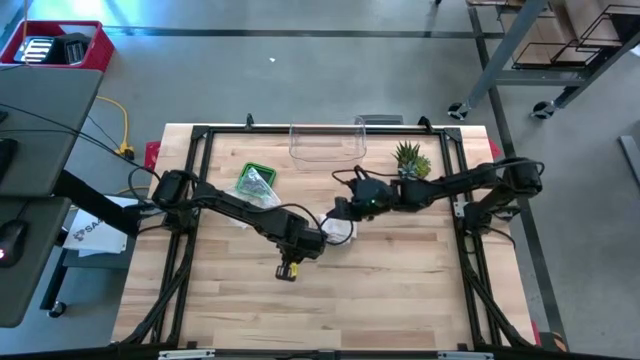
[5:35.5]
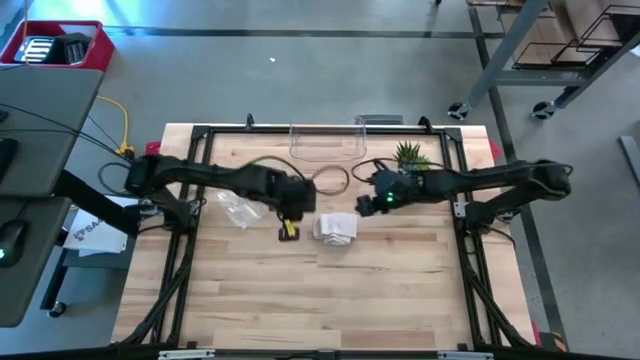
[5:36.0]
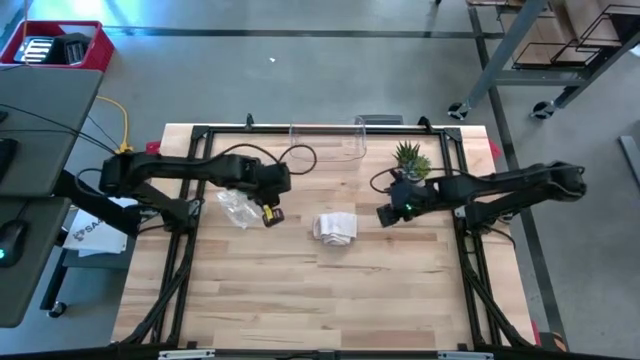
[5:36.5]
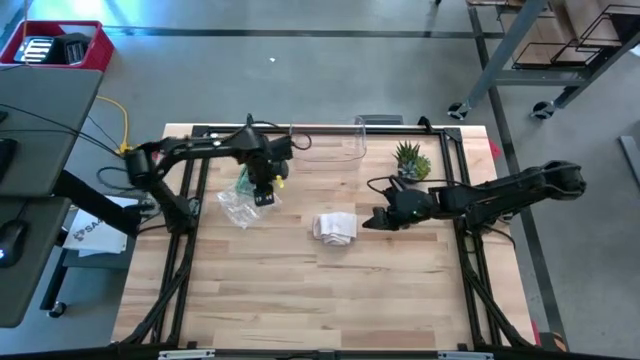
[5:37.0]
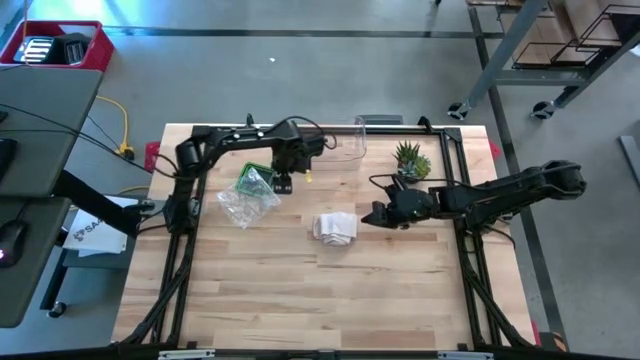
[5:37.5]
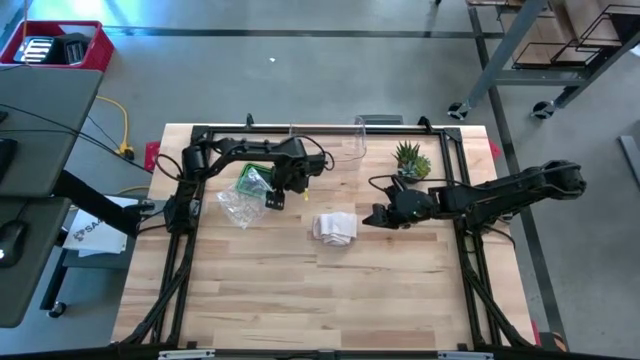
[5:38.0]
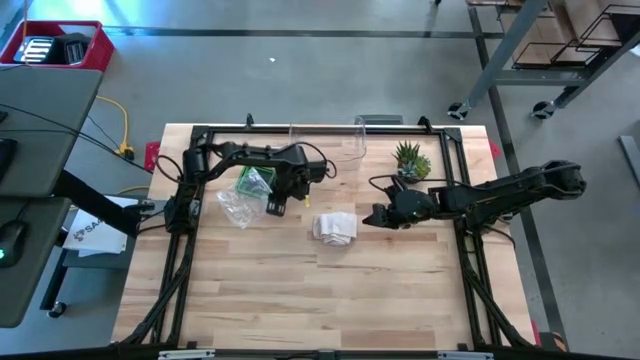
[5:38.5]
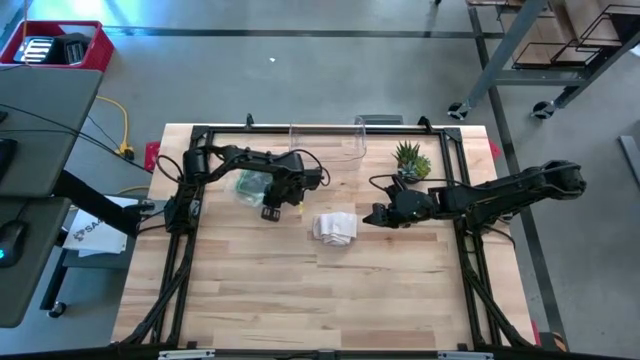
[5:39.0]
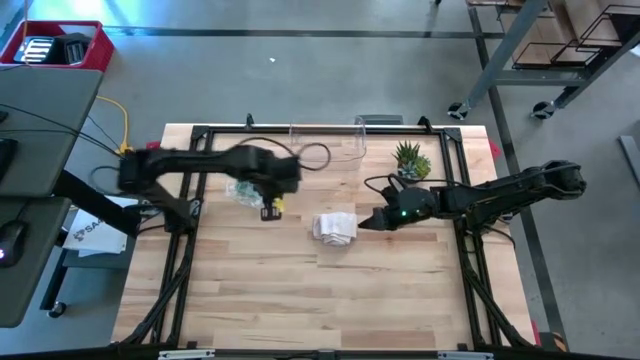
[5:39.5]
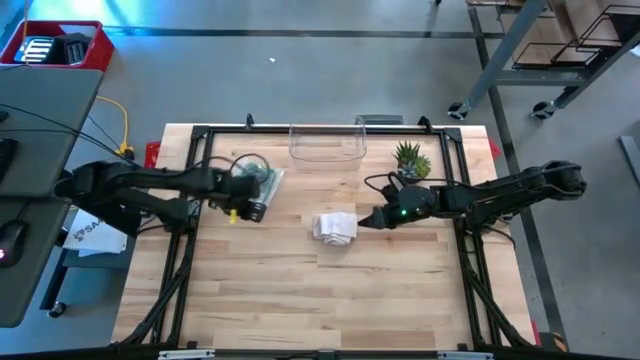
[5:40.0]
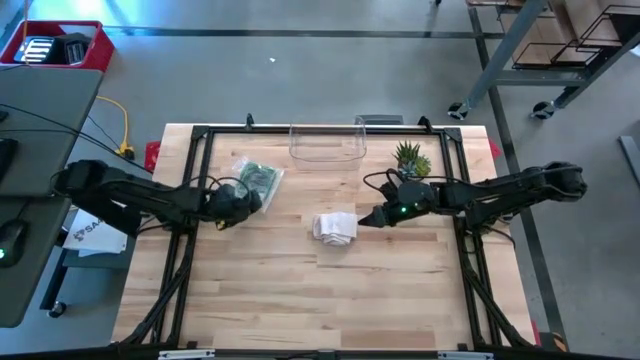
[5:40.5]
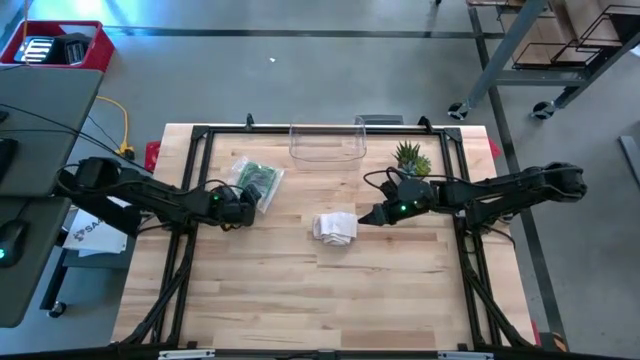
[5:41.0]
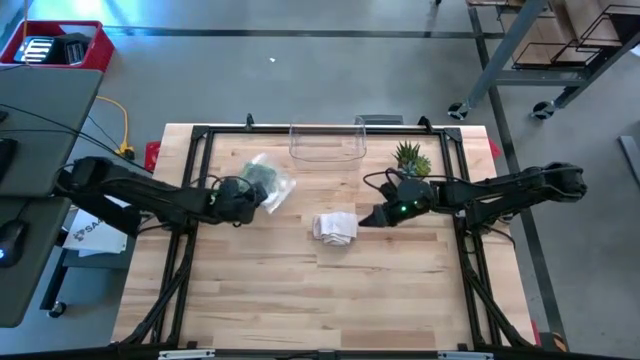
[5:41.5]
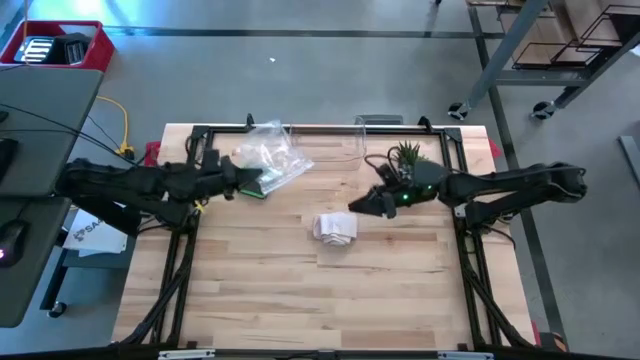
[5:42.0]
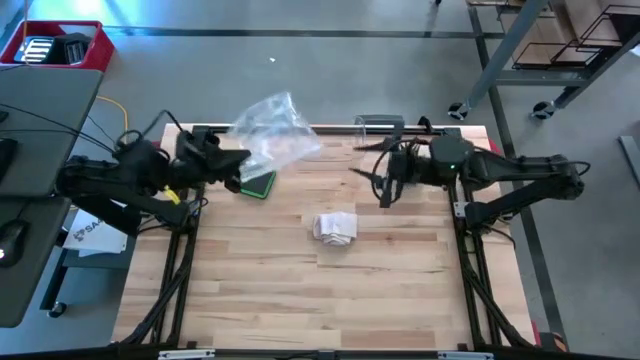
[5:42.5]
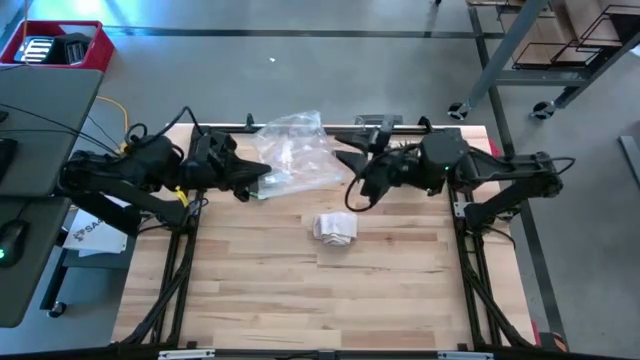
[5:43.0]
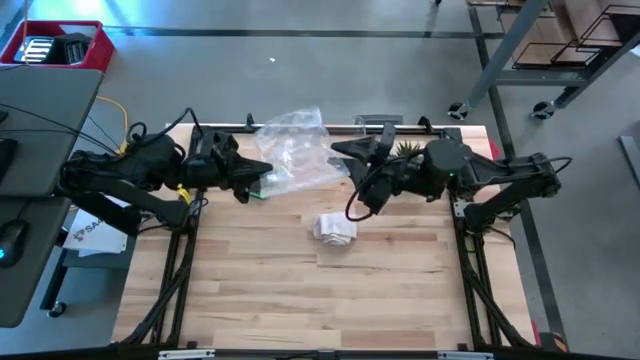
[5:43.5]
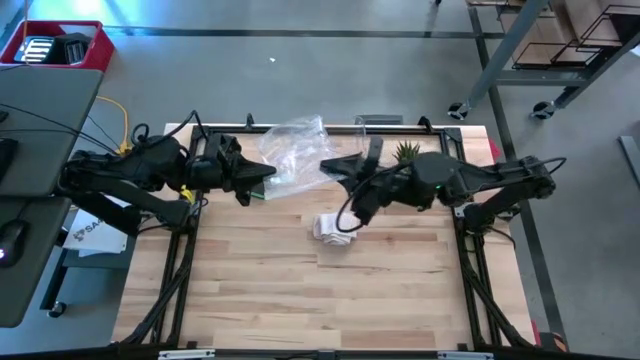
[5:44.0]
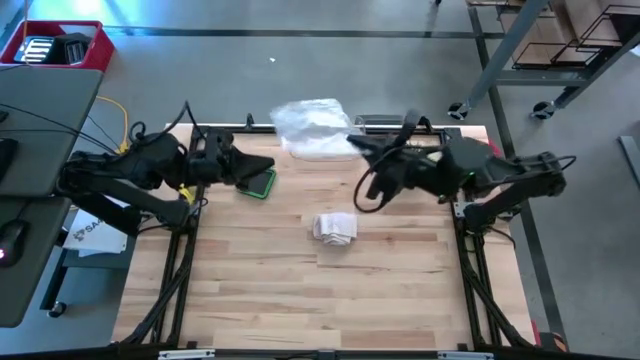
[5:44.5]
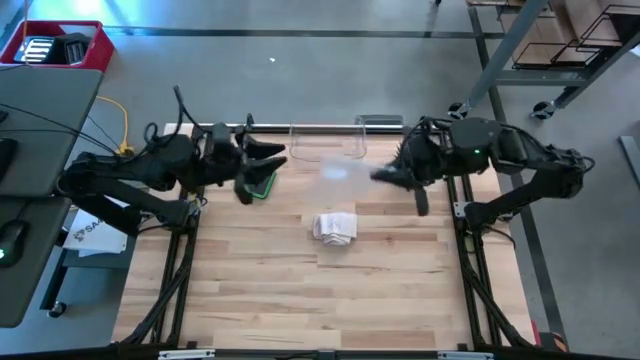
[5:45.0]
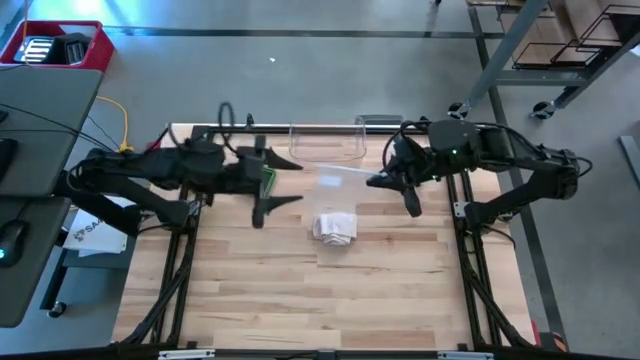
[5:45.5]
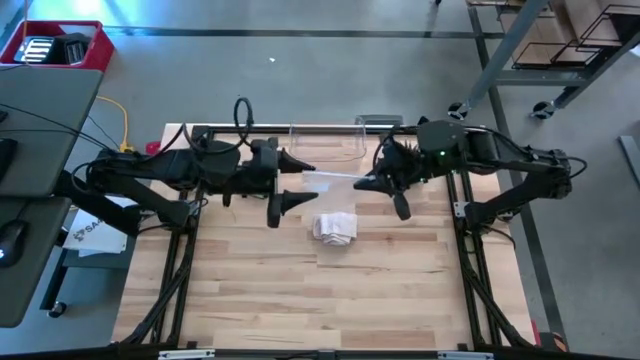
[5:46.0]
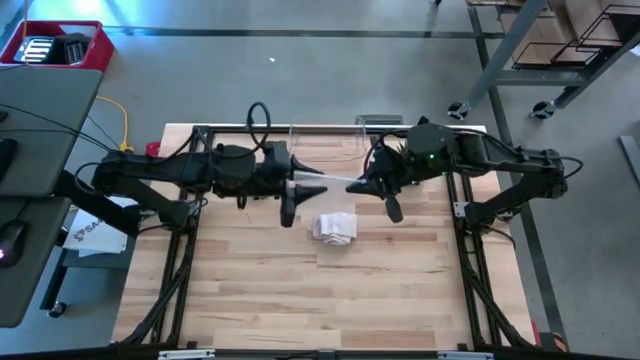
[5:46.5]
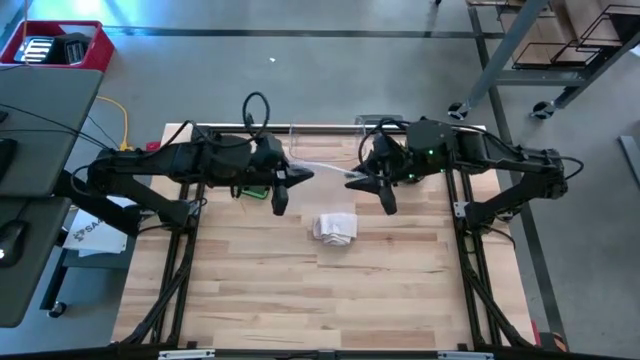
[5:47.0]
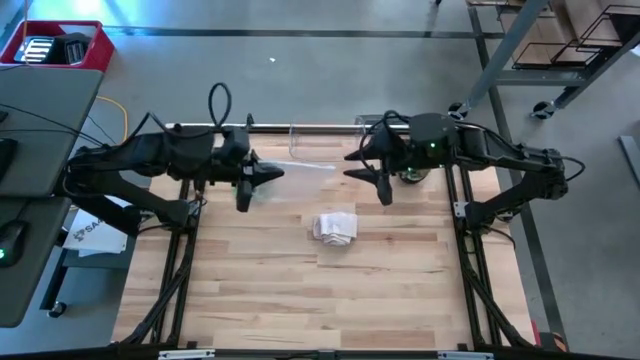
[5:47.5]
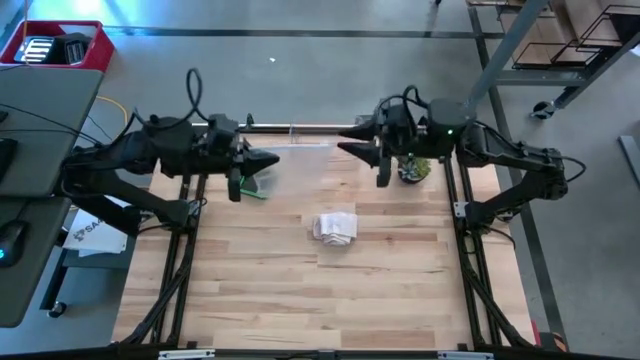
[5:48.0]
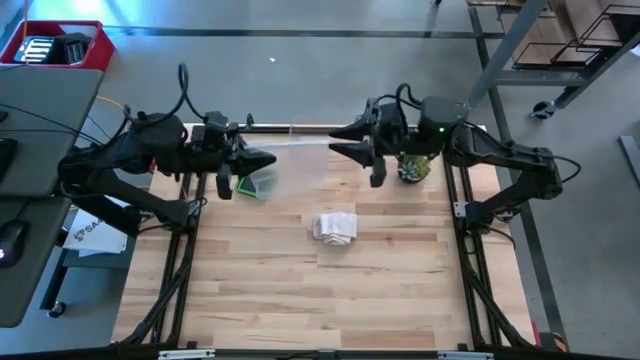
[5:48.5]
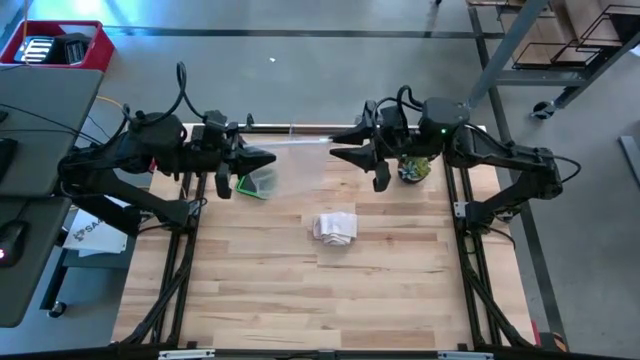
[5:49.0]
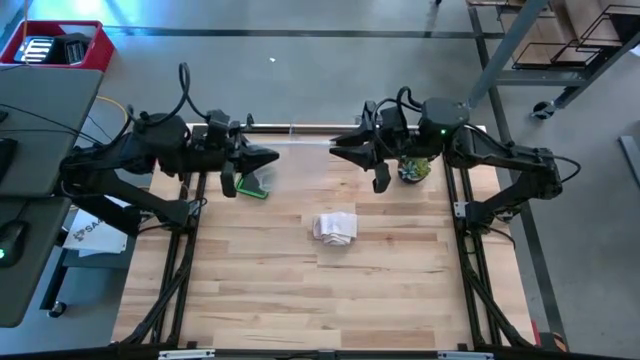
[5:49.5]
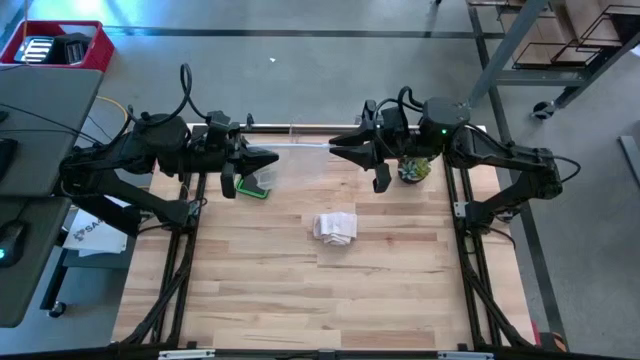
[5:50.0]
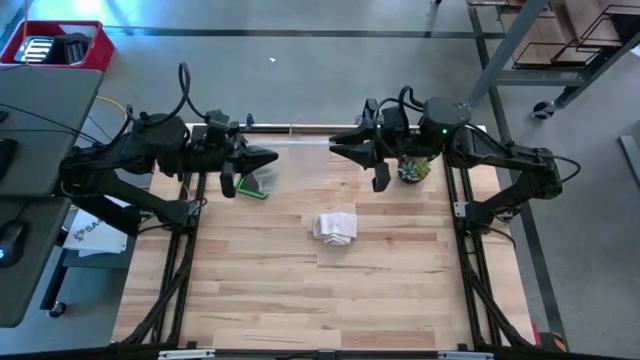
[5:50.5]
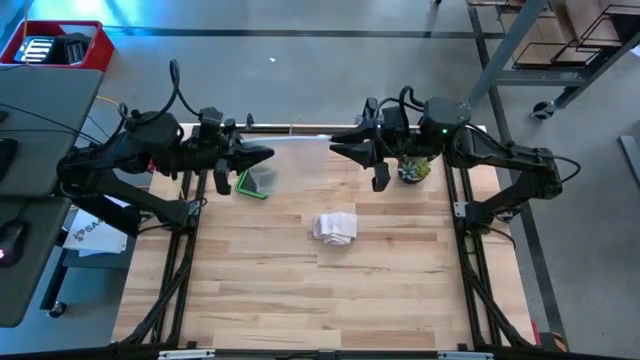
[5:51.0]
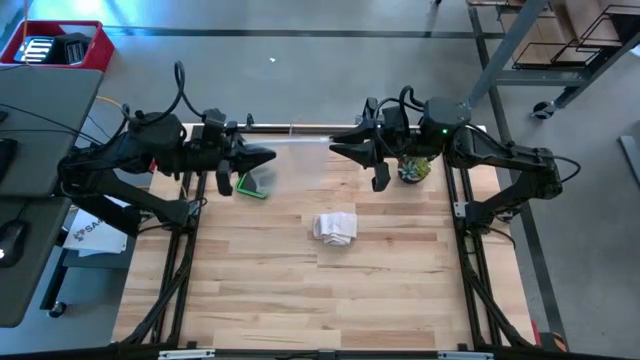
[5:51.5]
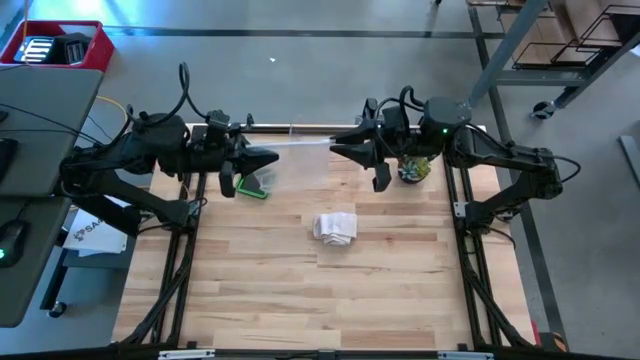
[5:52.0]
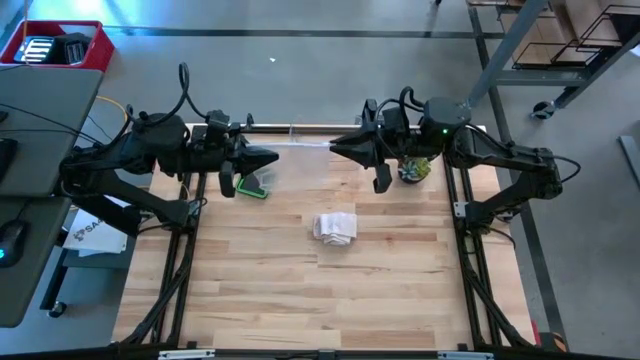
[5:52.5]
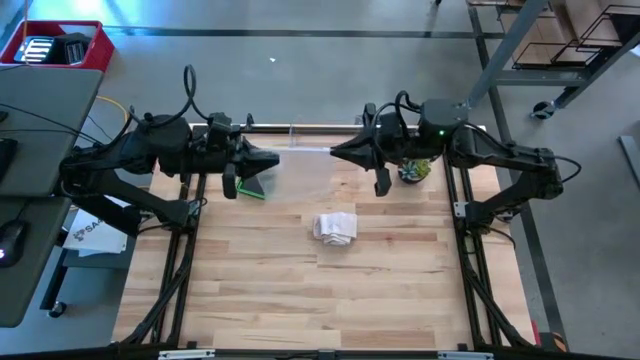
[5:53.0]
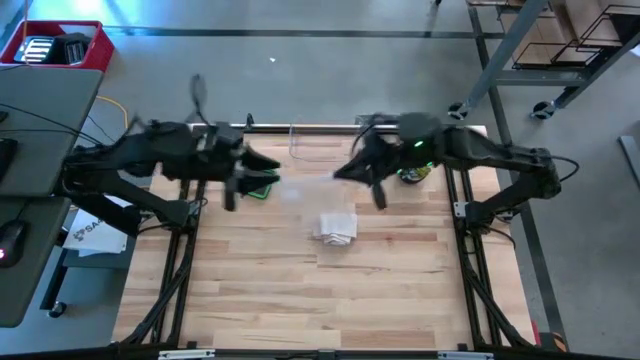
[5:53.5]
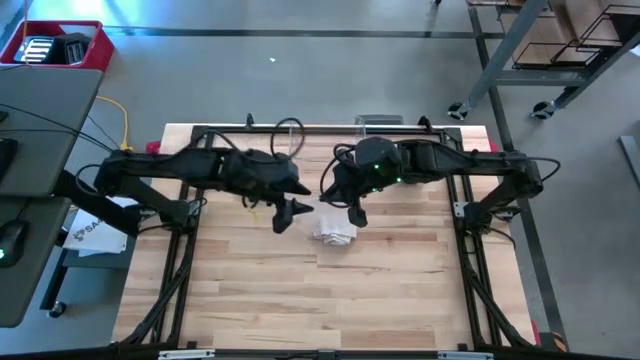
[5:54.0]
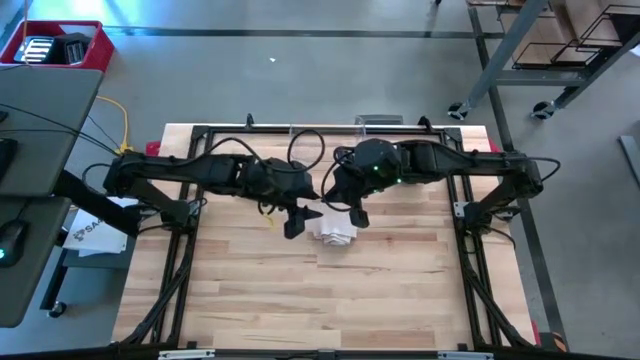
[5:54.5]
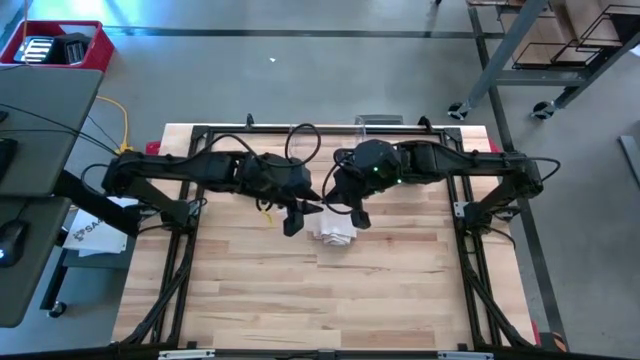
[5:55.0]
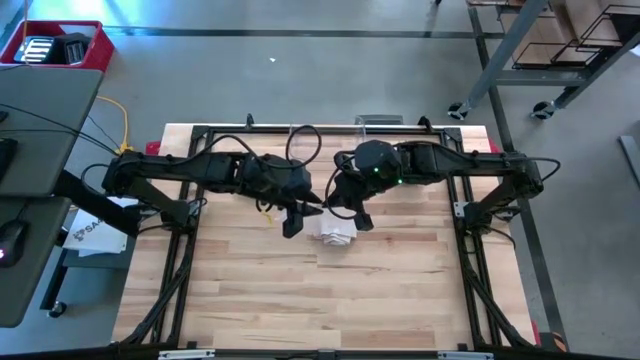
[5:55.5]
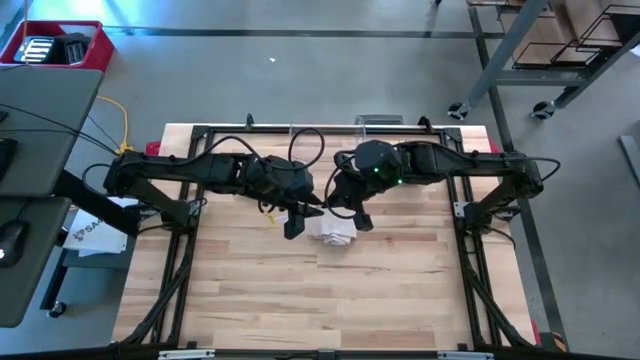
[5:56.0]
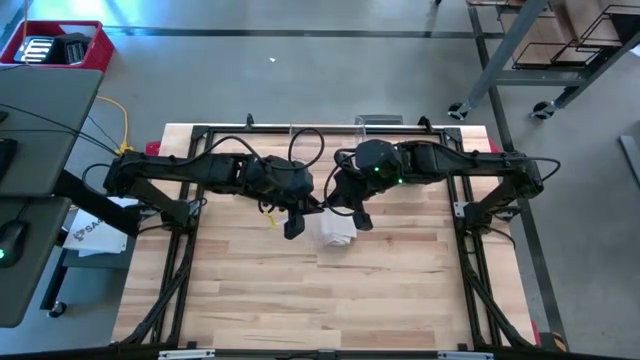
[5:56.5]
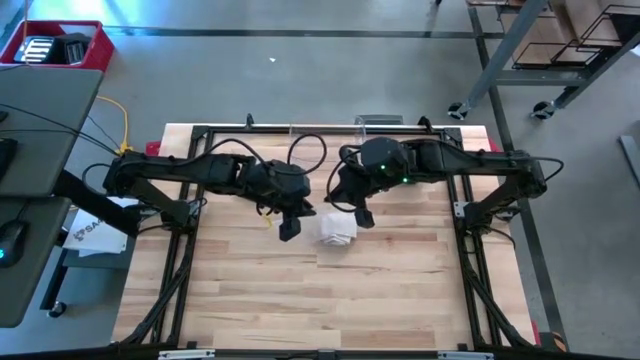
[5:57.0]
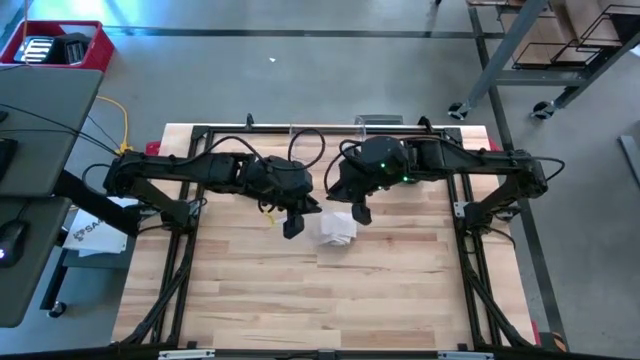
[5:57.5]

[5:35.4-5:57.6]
Task: Roll bandage
Open the transparent zip bag
